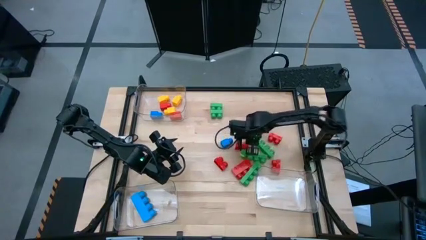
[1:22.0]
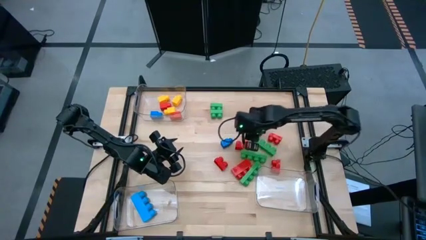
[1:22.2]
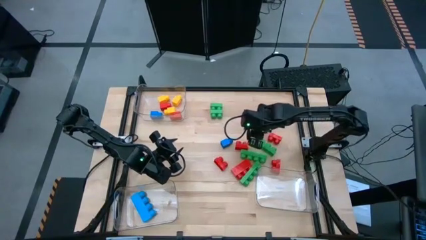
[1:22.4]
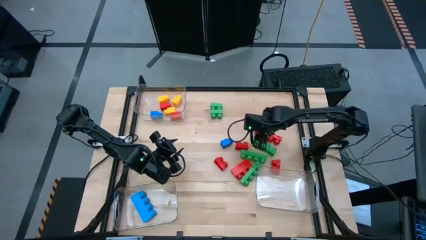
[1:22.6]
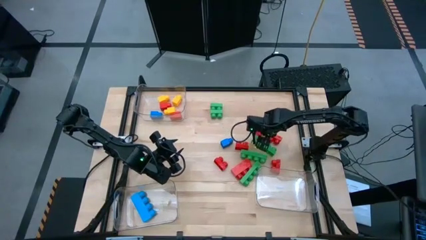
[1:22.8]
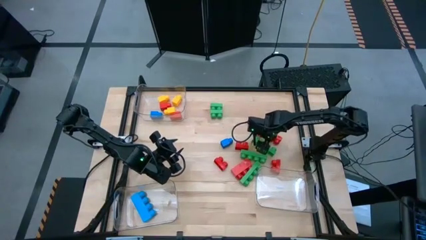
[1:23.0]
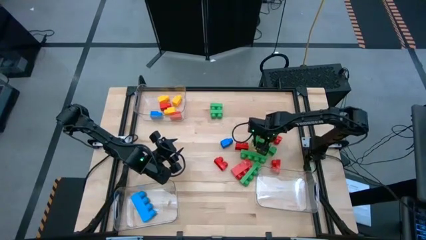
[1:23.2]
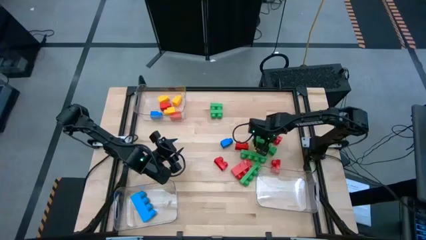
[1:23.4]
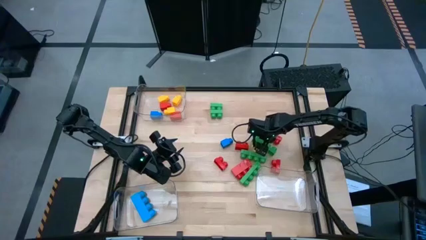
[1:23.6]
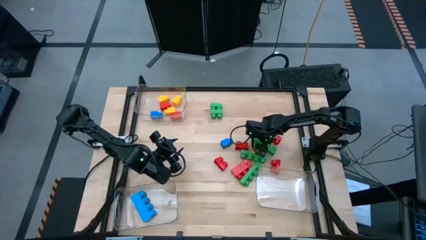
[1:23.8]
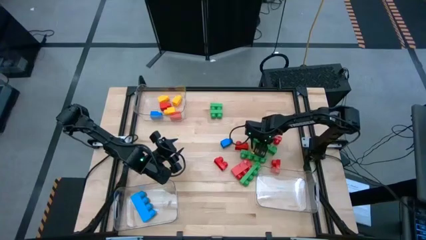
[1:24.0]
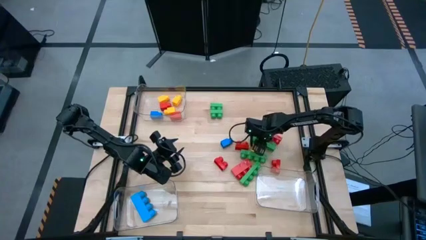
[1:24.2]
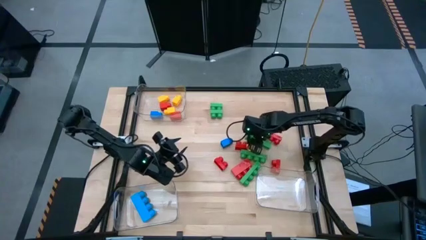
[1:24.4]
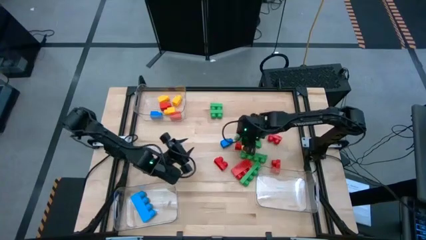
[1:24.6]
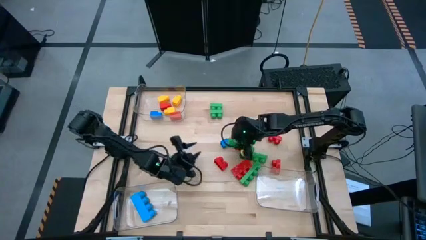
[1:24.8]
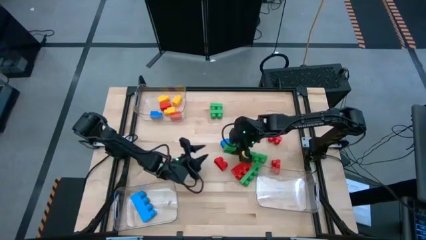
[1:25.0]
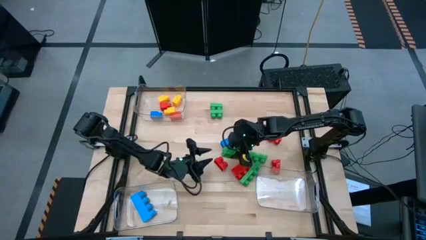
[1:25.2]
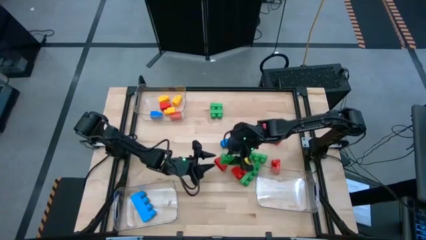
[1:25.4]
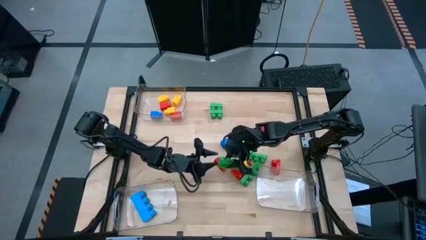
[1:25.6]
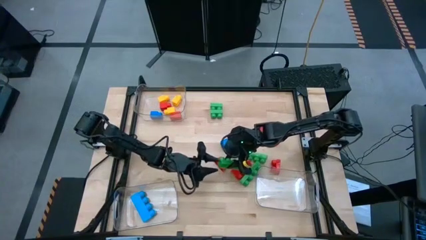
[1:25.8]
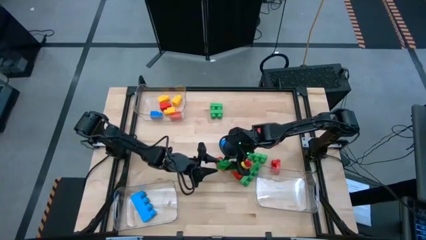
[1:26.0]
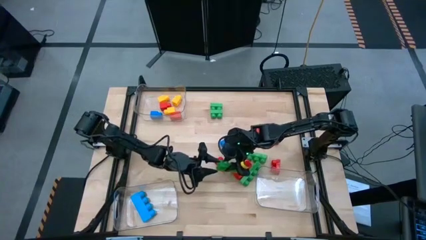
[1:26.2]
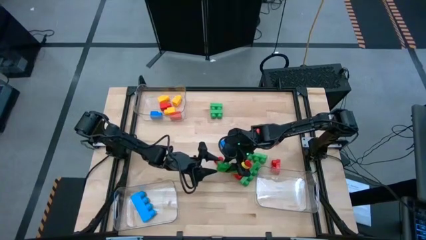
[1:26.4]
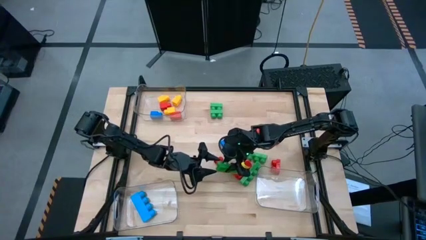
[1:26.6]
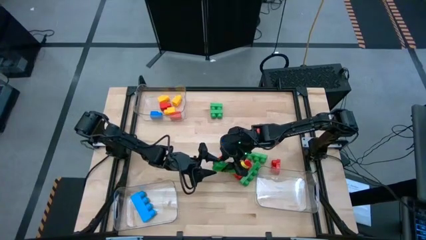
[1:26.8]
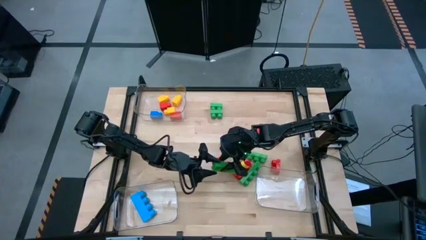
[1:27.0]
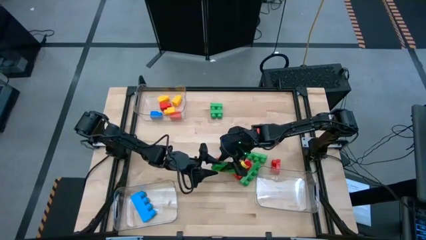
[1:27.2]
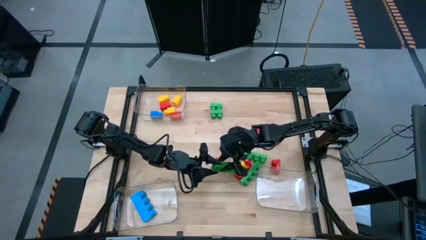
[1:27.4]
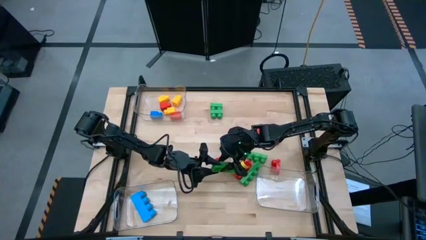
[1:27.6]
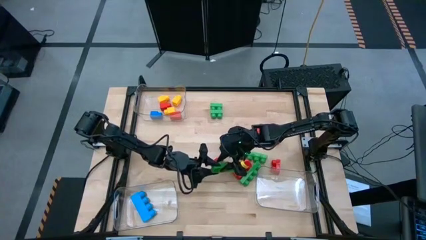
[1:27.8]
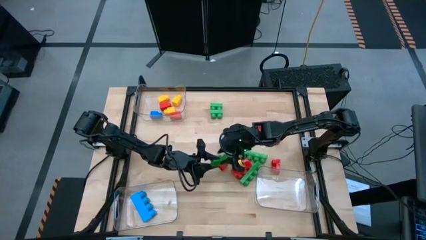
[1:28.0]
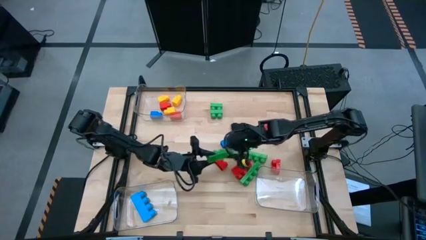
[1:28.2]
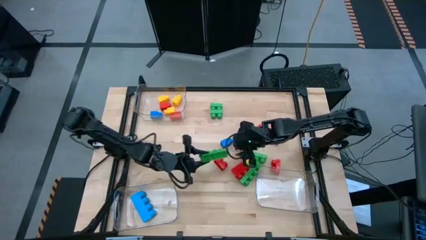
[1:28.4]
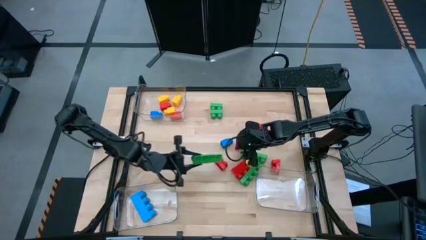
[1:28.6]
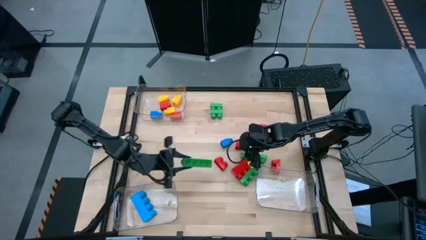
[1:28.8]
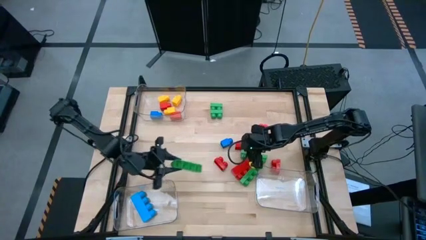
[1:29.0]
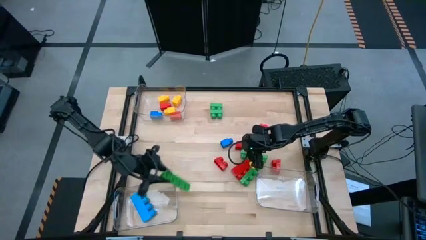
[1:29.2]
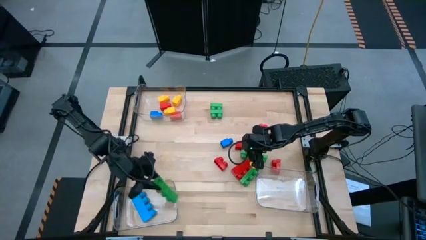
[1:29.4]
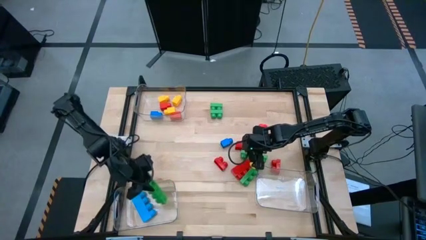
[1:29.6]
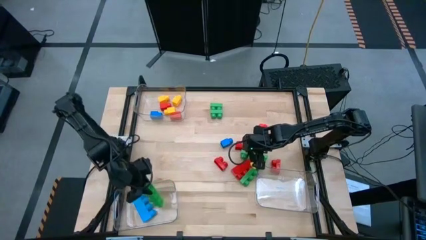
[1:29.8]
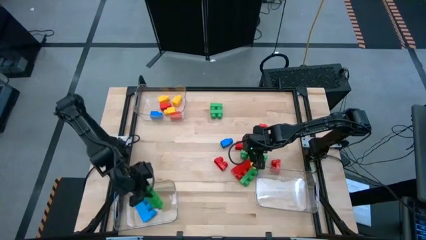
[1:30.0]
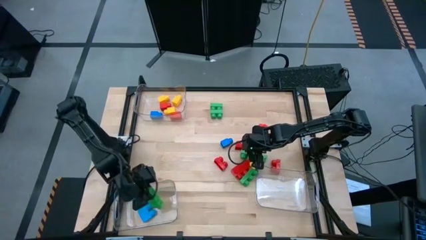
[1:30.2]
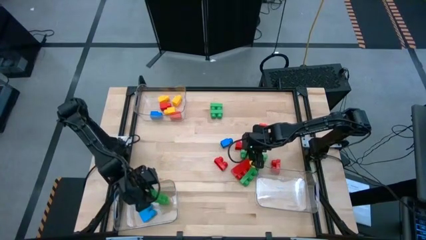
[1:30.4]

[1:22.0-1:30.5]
Task: Sort blocks by size
Put the four-stud green game piece into the bottom left transparent bin

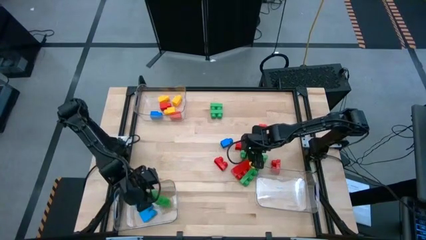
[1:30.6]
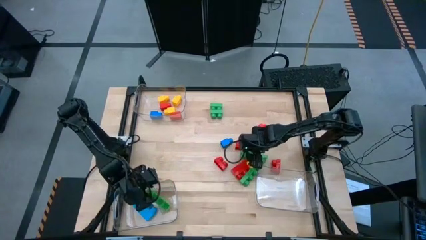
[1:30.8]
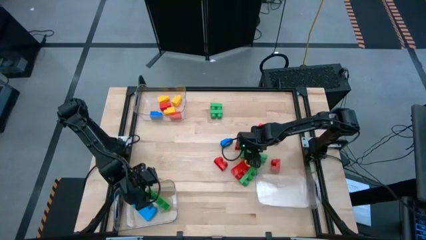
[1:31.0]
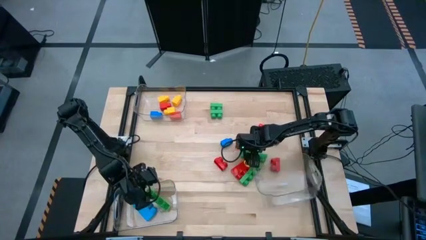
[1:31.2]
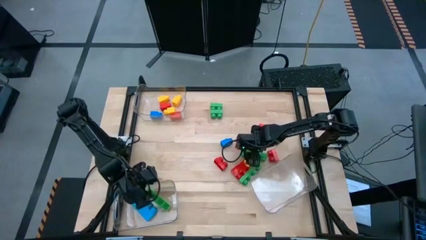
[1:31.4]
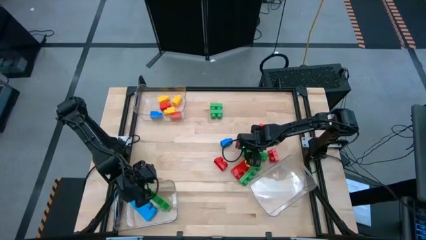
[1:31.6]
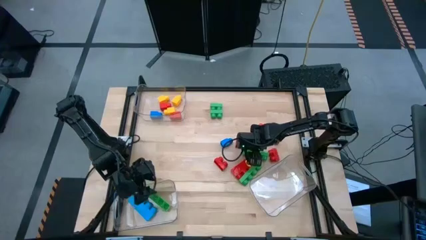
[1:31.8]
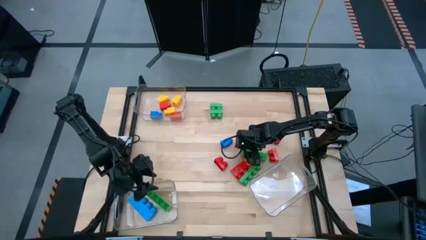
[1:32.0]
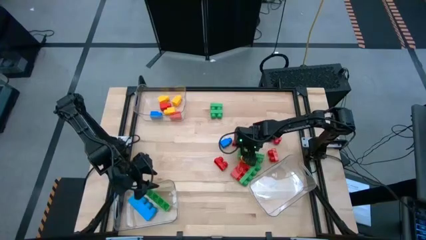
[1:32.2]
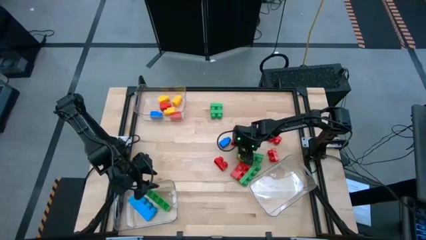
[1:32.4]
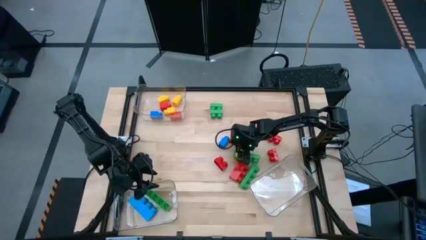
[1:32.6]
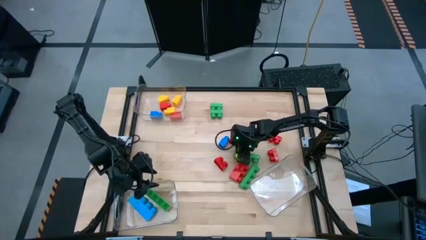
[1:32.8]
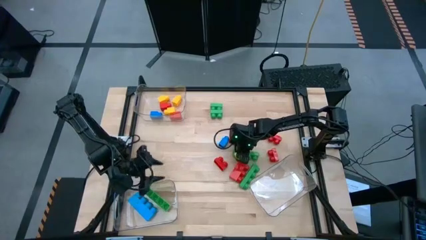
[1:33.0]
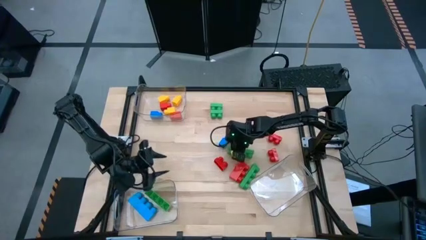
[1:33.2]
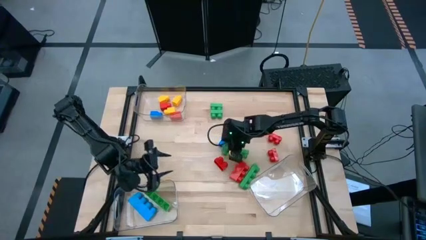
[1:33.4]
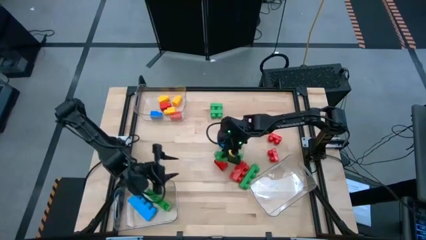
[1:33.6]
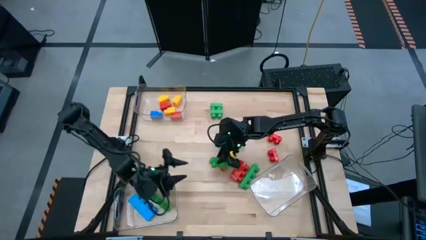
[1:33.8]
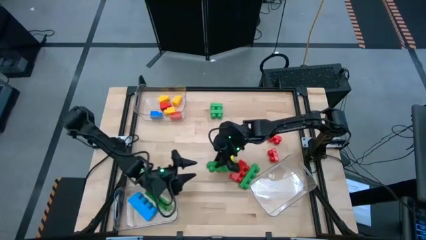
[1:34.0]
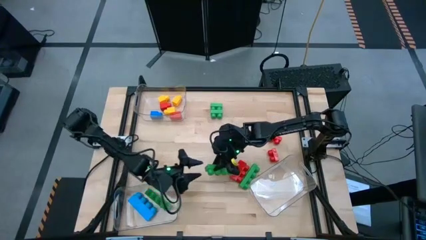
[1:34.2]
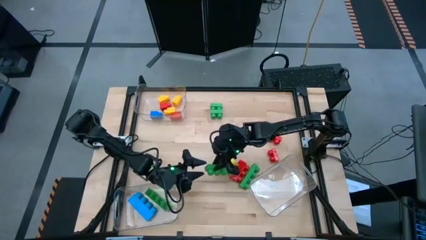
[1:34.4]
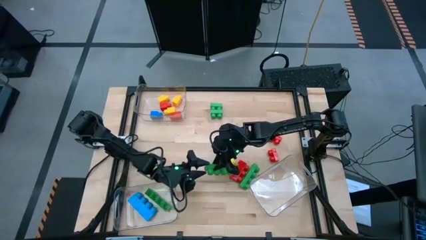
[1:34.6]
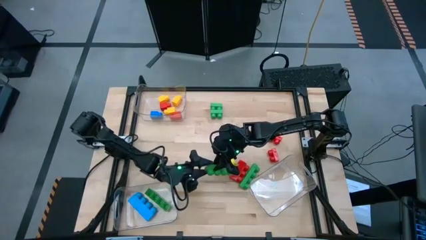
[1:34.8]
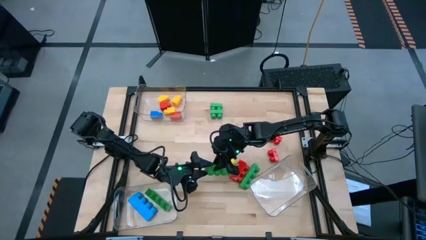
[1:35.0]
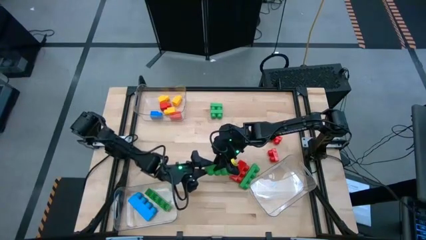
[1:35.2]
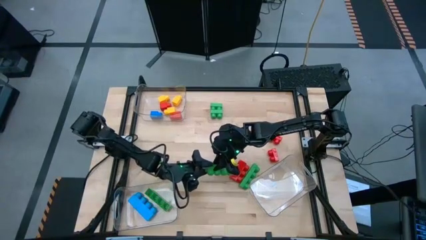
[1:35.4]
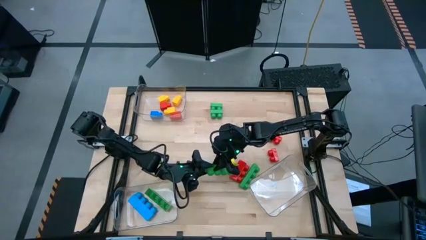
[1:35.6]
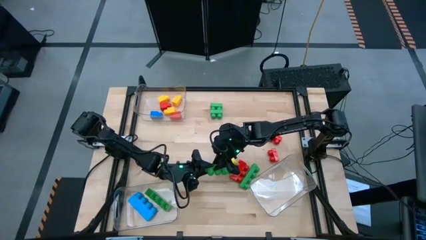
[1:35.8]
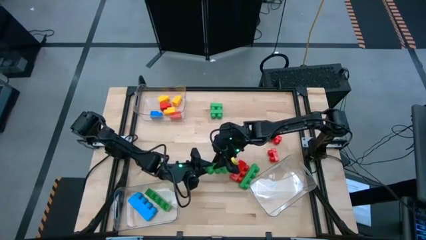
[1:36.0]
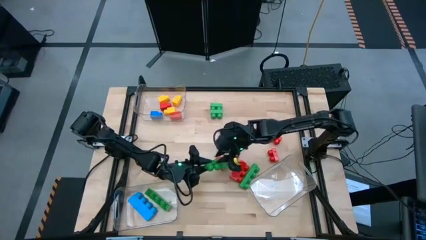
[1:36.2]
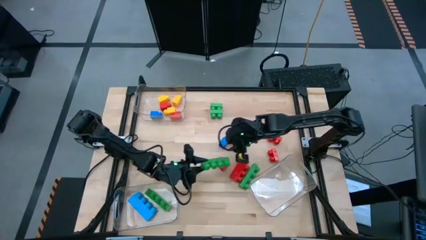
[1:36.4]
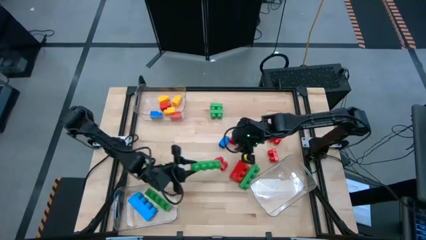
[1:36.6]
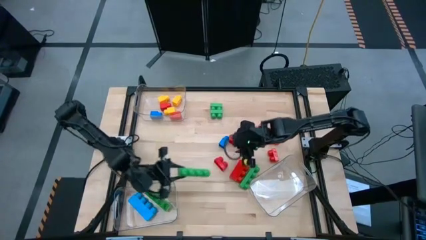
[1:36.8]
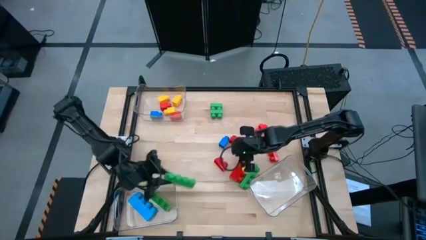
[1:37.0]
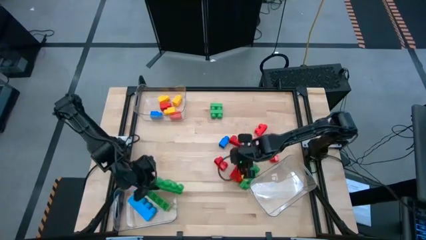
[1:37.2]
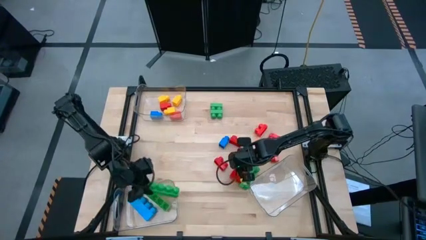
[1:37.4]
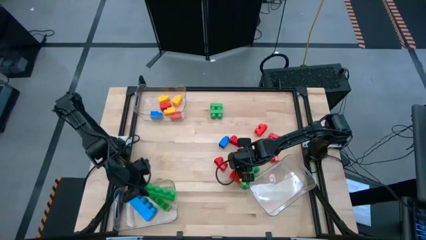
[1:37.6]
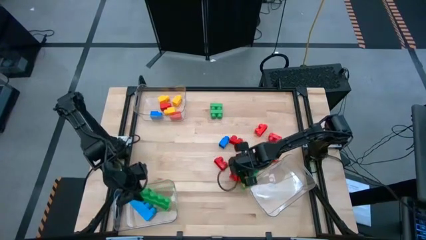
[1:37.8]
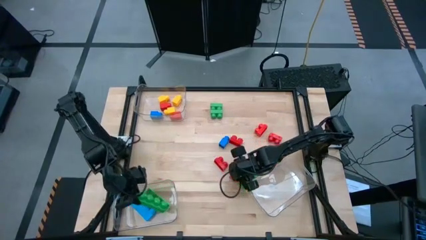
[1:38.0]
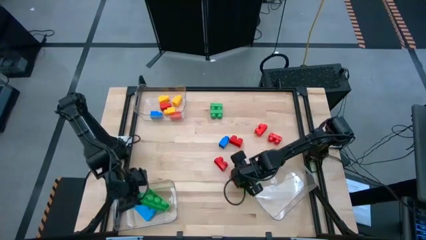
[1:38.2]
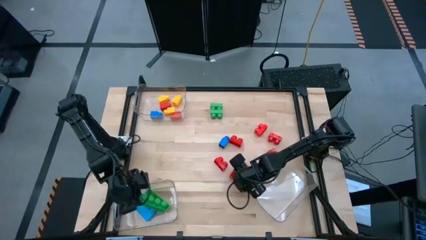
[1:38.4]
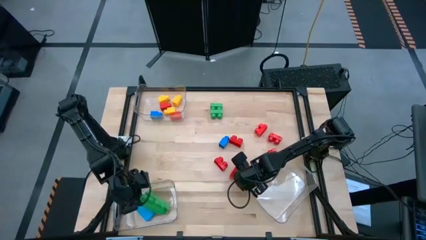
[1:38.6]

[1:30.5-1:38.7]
Put the four-stud green game piece into the bottom left transparent bin

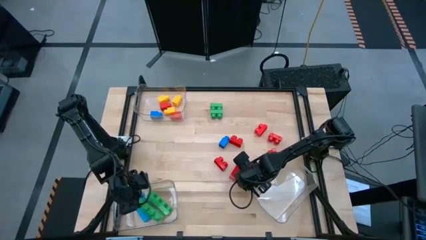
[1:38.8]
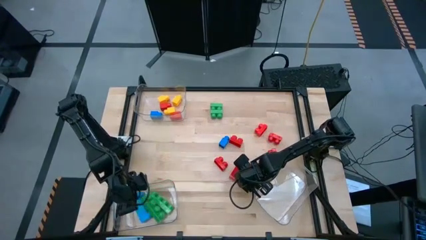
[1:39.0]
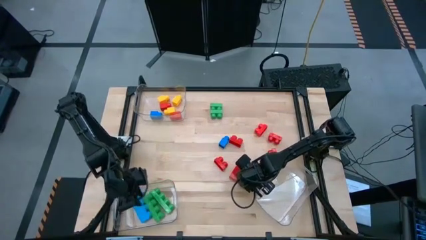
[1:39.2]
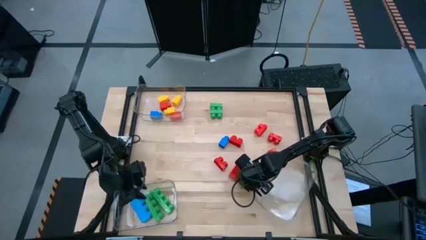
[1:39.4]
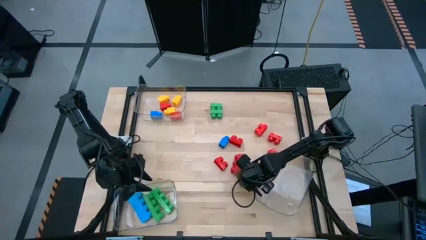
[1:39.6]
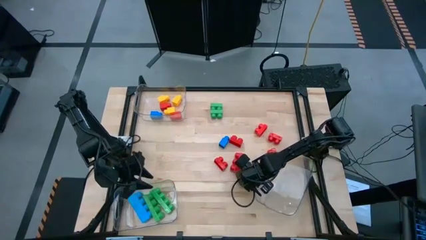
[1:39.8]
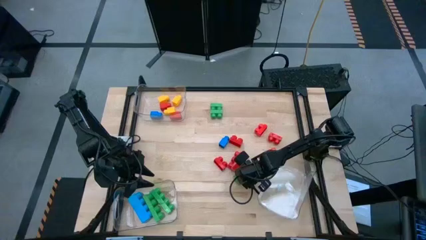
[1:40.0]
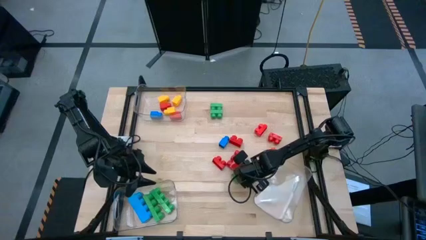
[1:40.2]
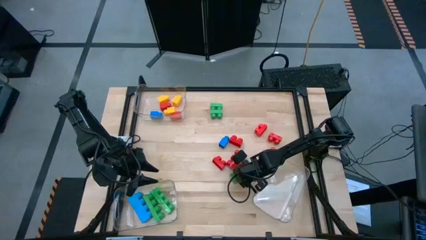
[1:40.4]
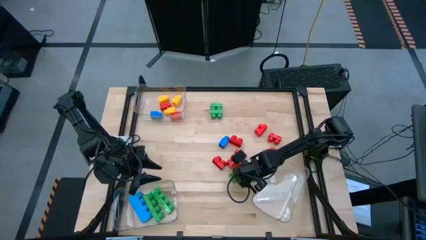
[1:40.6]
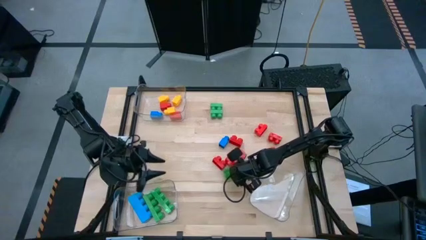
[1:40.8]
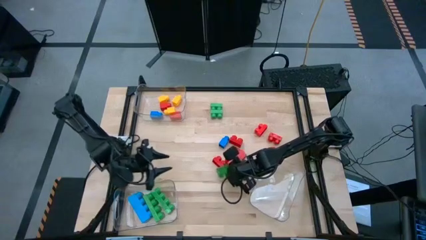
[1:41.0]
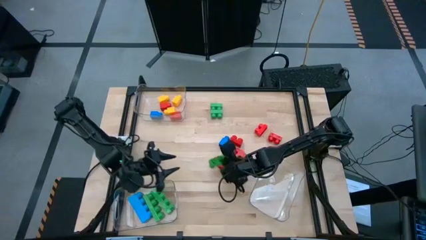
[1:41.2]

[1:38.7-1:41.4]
Put the four-stud green game piece into the bottom left transparent bin
